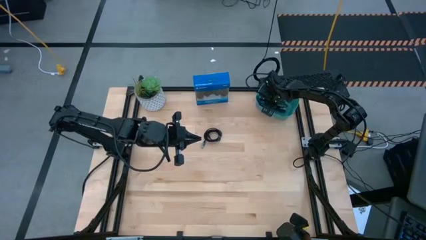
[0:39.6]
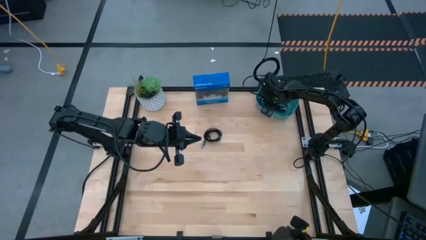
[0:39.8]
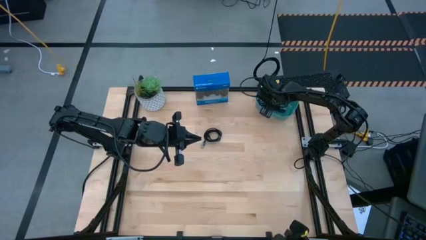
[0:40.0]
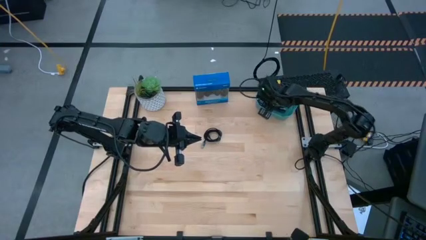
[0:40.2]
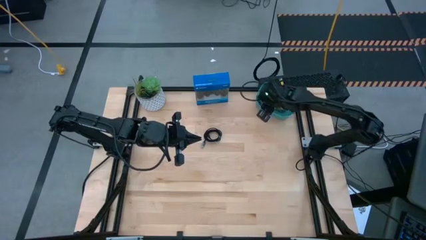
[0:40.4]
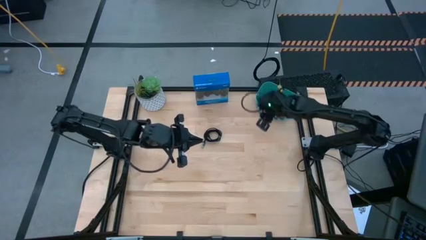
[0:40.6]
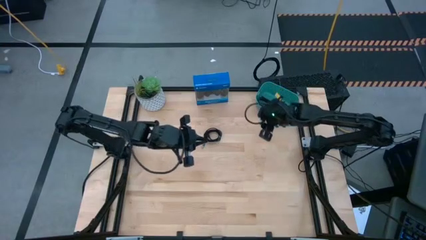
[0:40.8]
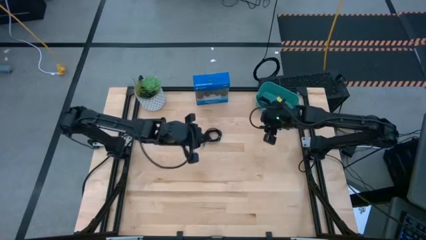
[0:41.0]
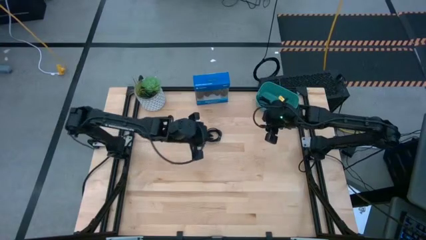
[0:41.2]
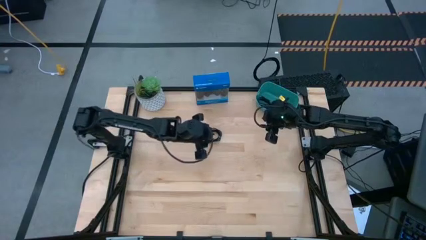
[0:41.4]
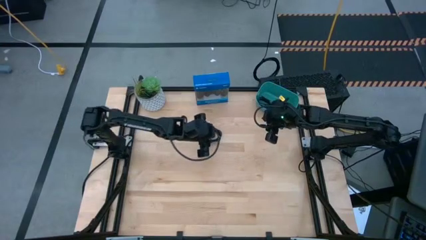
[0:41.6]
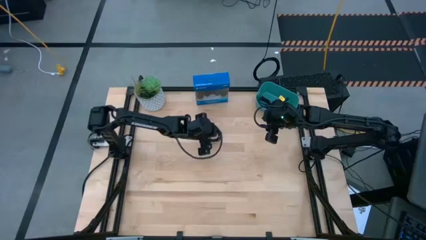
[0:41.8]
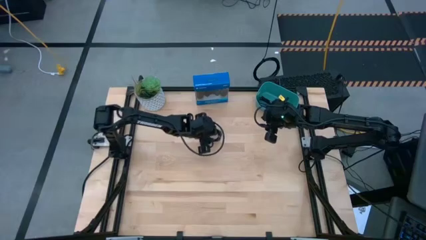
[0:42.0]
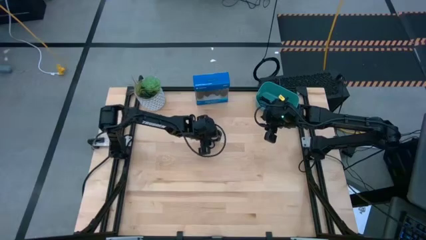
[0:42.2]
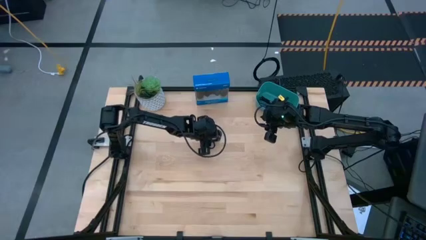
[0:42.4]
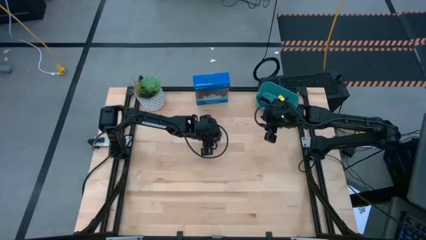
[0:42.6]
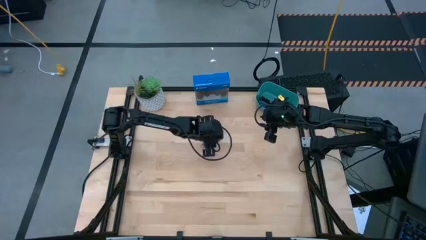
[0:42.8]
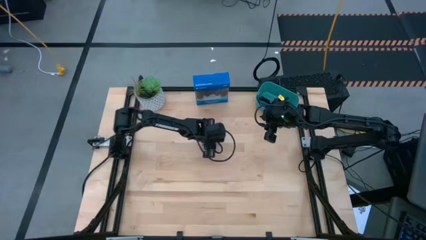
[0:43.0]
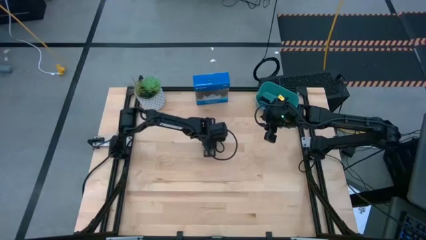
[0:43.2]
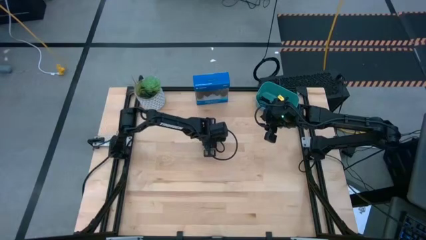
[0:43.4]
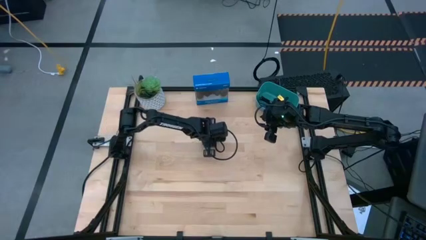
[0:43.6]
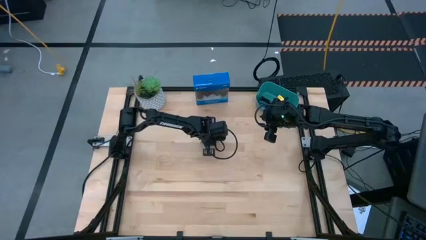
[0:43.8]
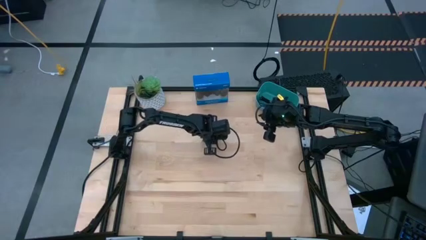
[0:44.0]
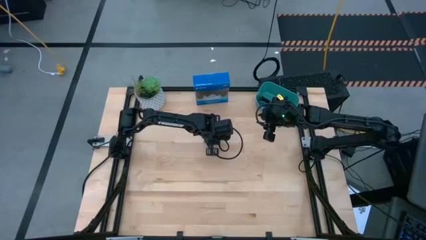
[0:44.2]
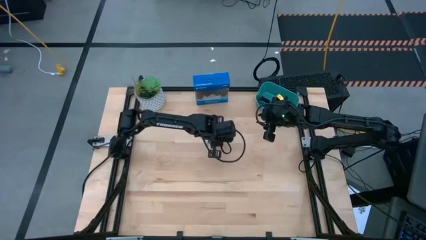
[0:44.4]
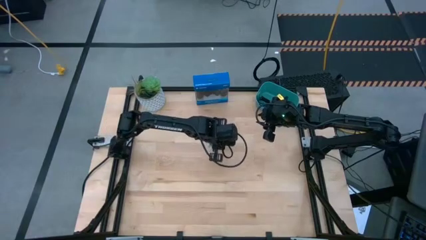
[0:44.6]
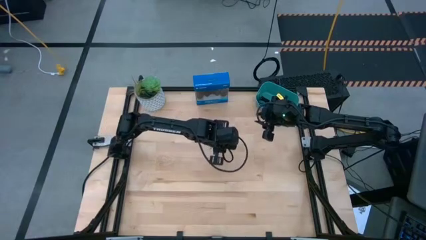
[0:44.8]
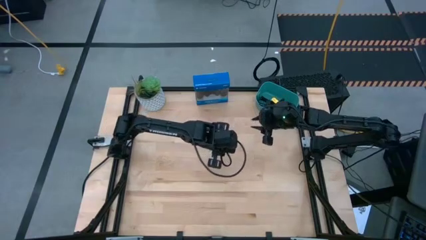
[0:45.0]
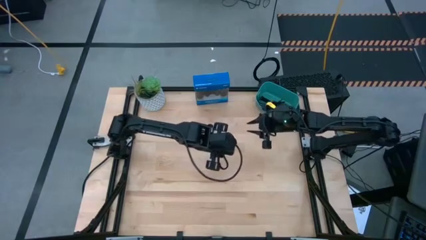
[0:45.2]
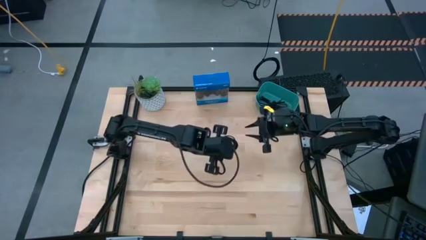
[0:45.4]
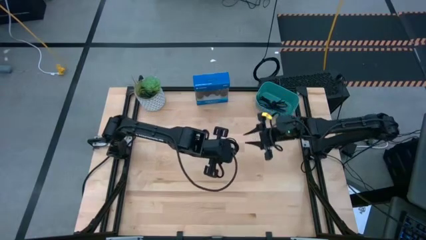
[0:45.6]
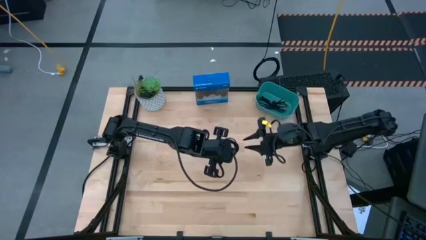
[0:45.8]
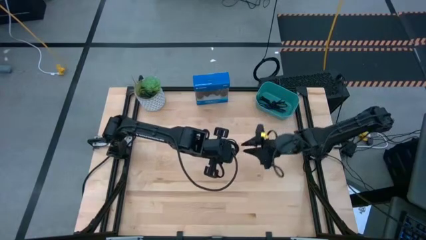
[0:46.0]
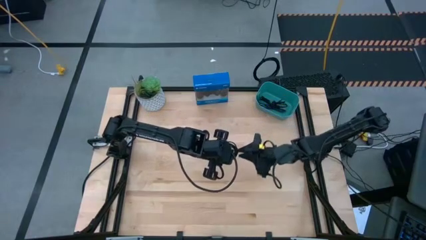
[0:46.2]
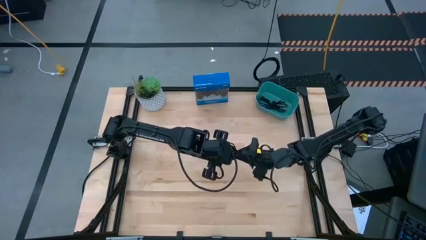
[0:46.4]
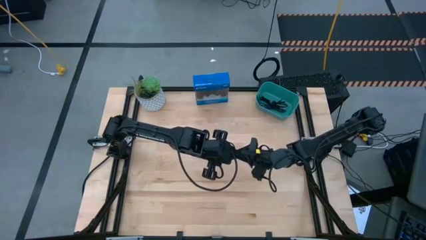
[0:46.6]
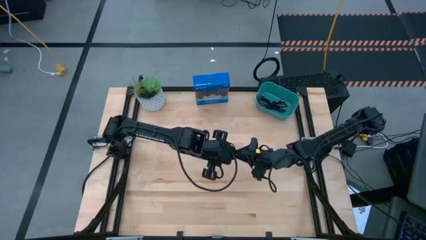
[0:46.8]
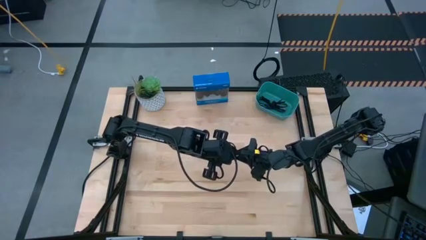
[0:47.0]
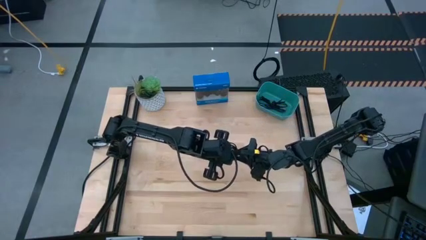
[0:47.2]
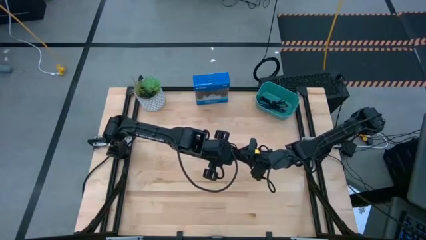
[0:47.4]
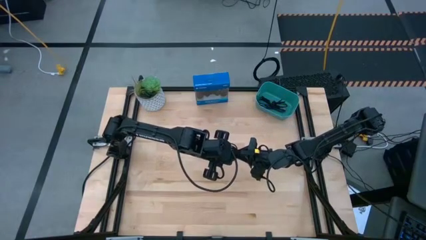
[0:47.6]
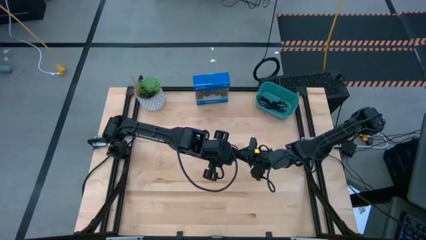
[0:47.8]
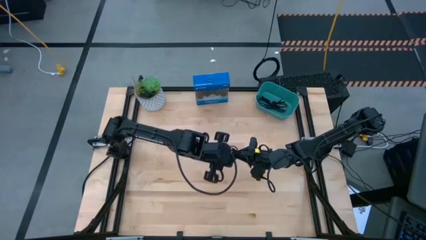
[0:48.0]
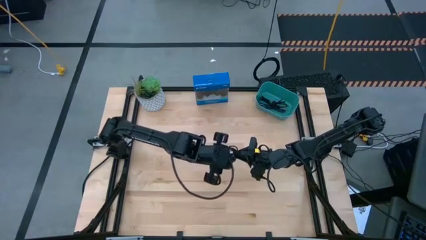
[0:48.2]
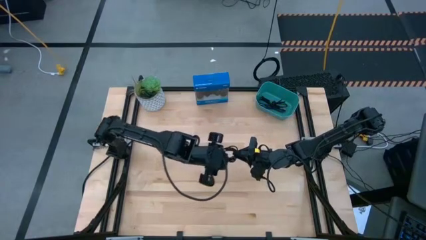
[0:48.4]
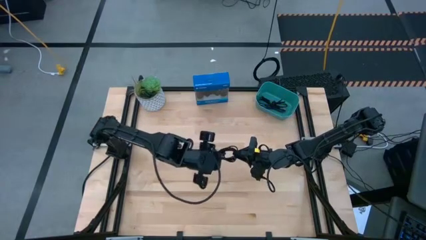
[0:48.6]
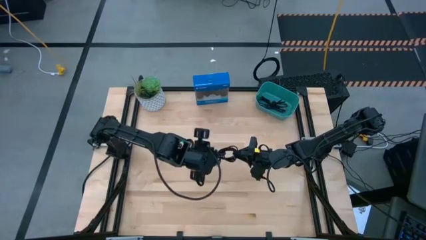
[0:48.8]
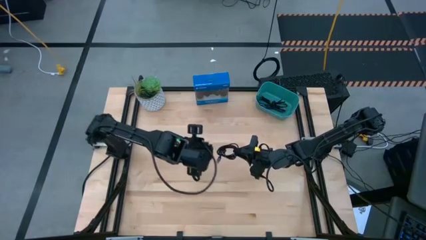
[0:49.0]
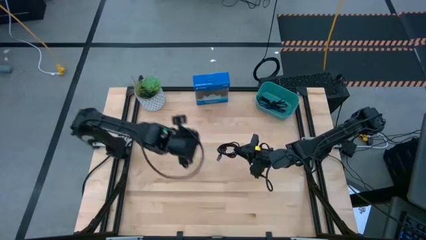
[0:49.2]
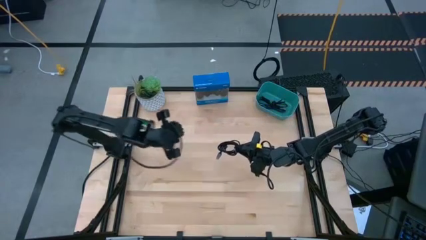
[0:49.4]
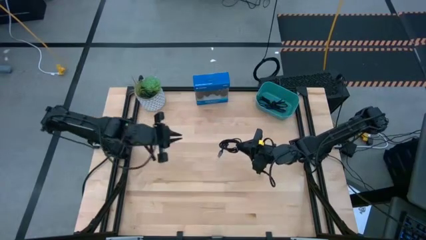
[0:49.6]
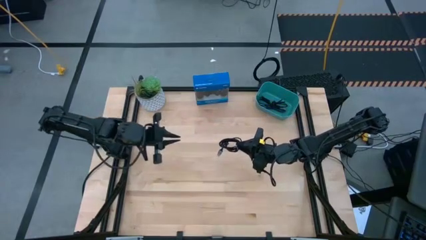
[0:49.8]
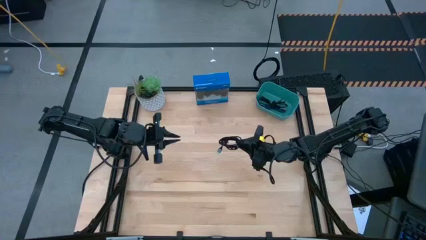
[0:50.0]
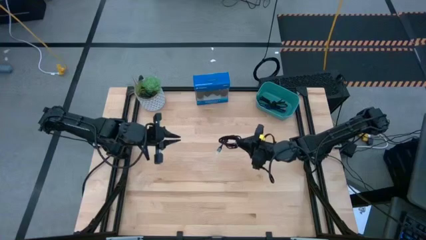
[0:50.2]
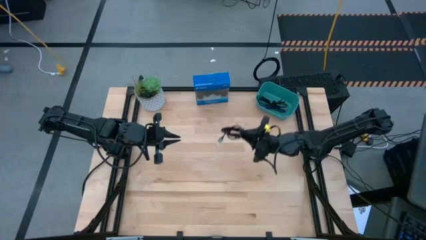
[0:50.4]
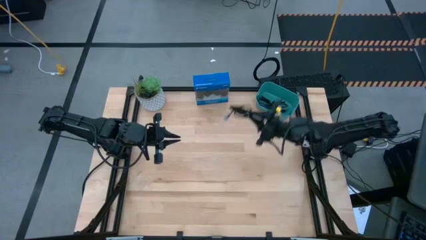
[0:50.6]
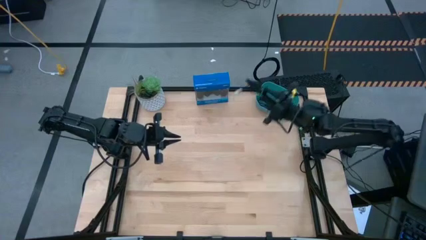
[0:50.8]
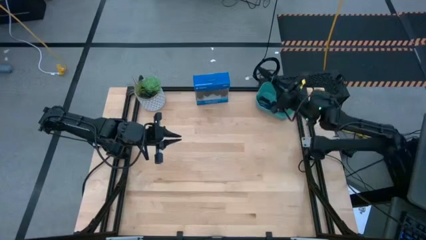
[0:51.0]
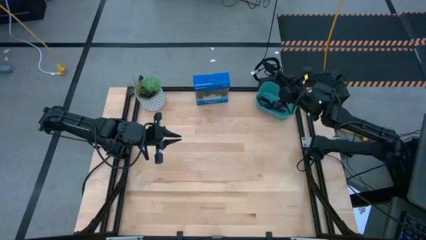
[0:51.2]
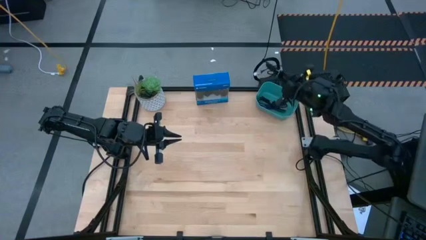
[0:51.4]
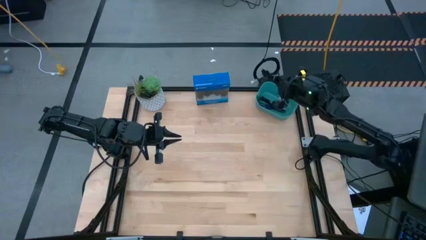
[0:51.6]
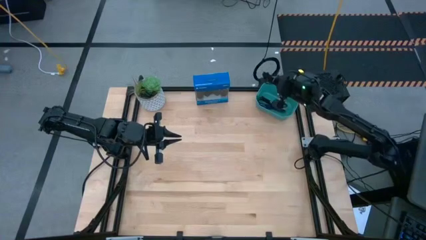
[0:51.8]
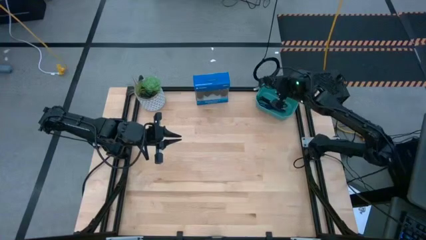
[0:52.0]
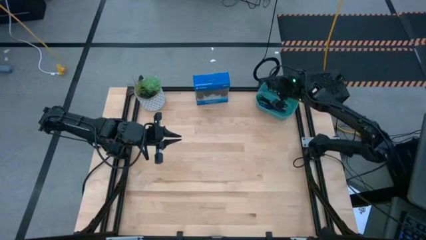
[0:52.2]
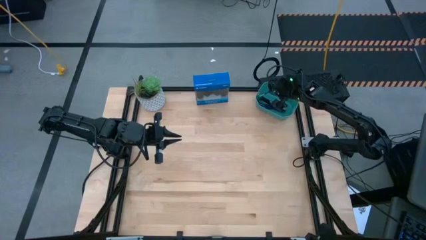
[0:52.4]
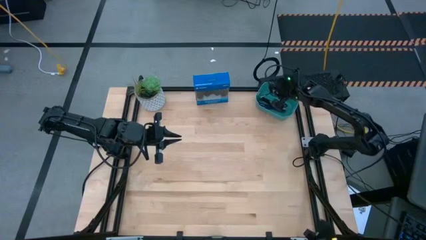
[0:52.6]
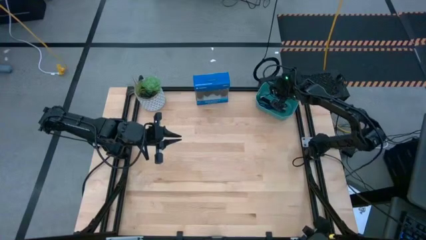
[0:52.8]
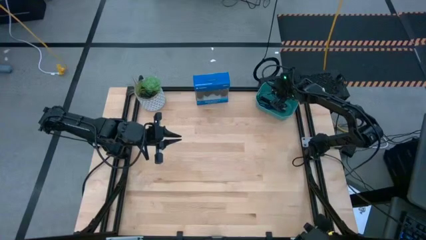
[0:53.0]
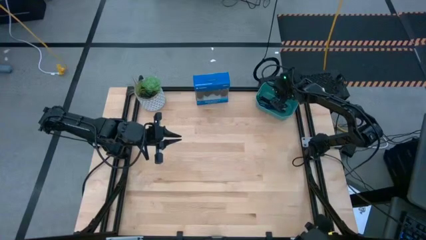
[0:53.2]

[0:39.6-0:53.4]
Task: Pick and place USB-C Cables
Put the black charger cable into the green bin

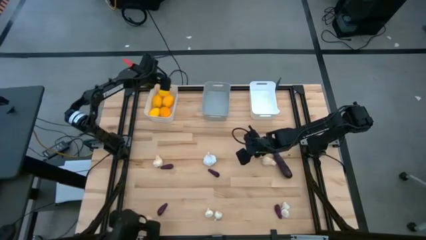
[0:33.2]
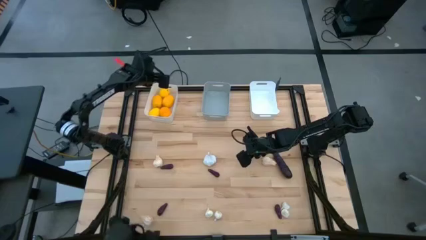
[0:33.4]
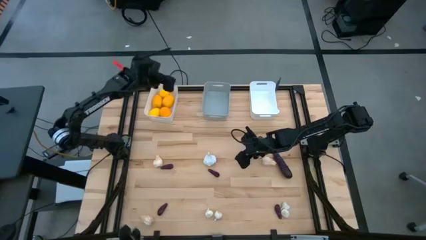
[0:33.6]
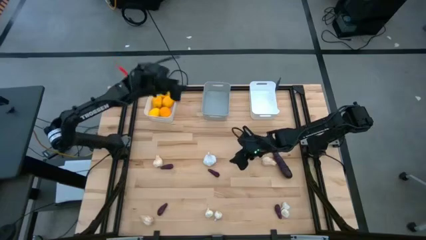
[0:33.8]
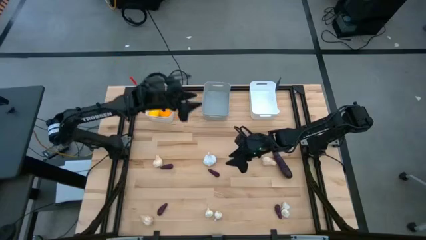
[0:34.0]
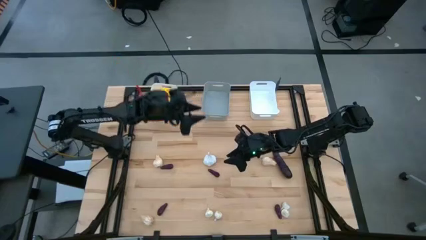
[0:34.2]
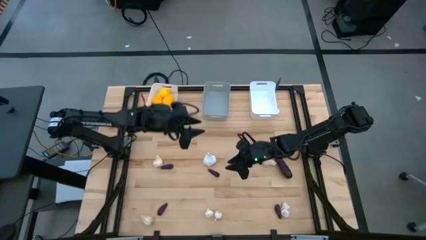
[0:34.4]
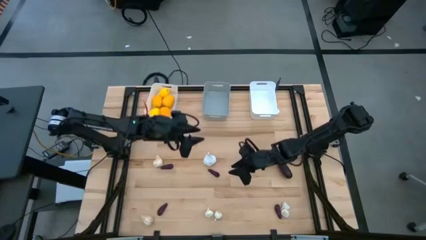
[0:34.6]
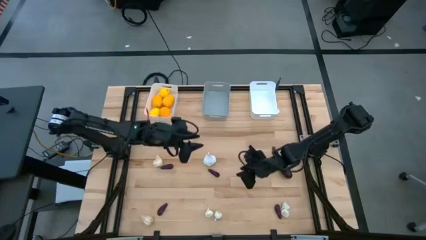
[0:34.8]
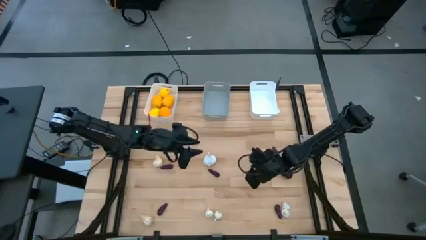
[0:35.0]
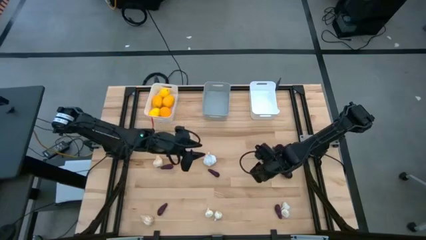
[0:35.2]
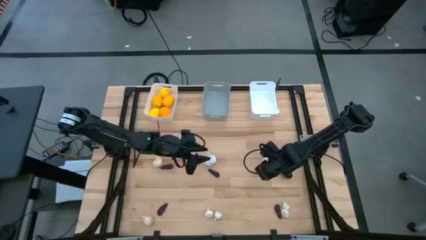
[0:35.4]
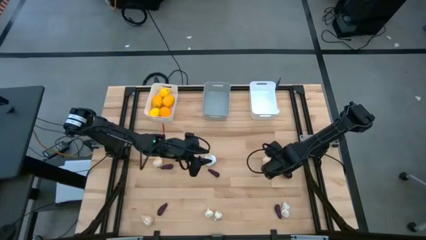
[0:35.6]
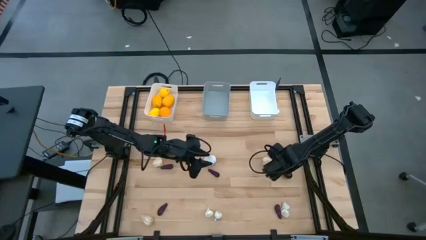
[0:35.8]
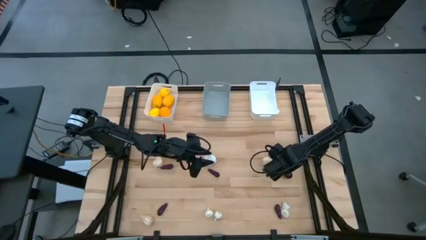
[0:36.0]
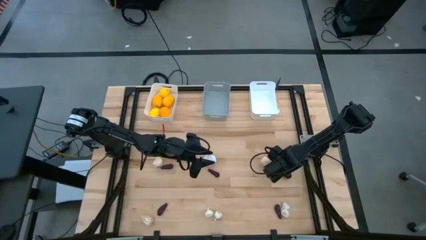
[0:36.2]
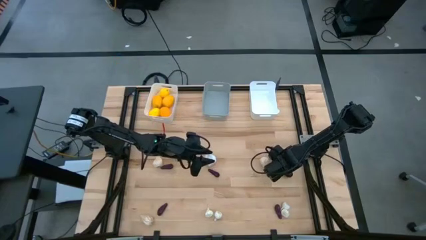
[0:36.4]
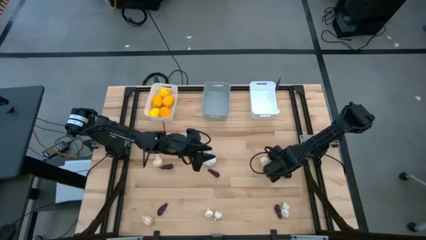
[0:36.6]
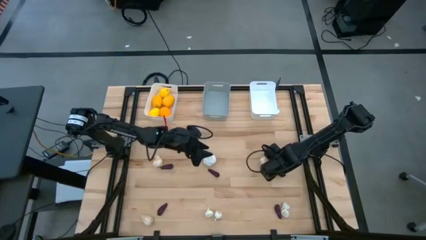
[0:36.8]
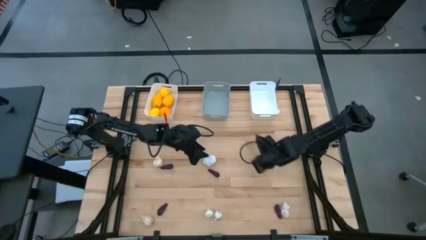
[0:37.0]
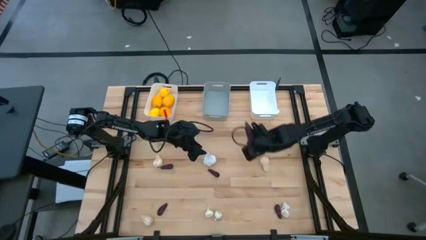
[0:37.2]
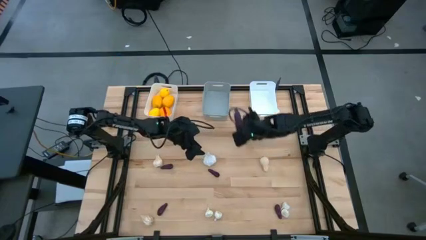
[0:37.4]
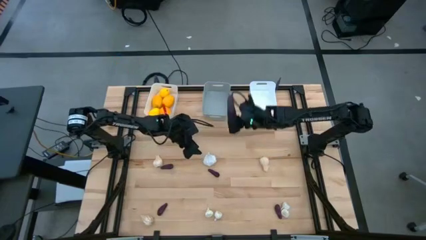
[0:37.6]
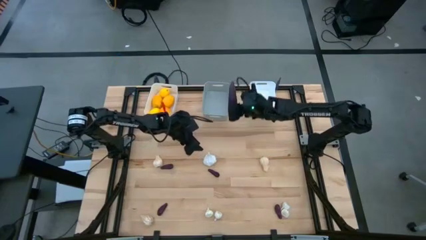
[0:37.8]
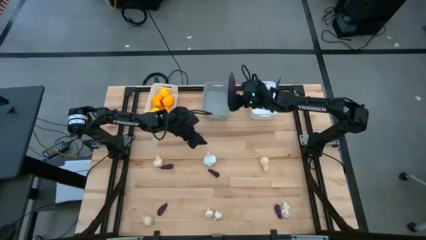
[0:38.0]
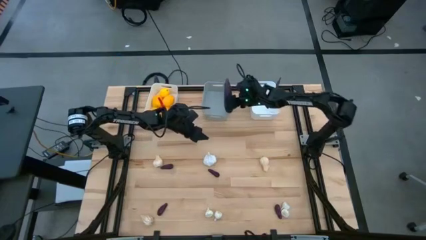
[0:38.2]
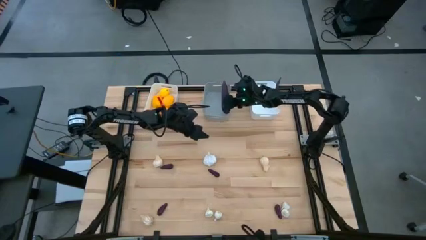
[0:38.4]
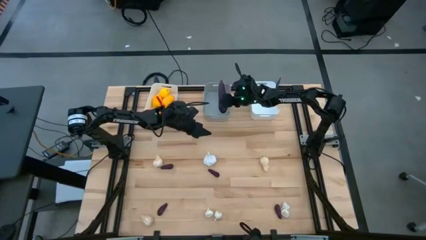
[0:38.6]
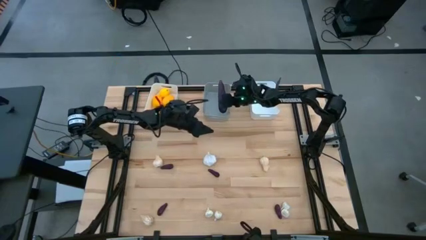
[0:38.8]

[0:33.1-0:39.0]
Task: Sort produce into baskets
Put the eggplant into the gray bin
